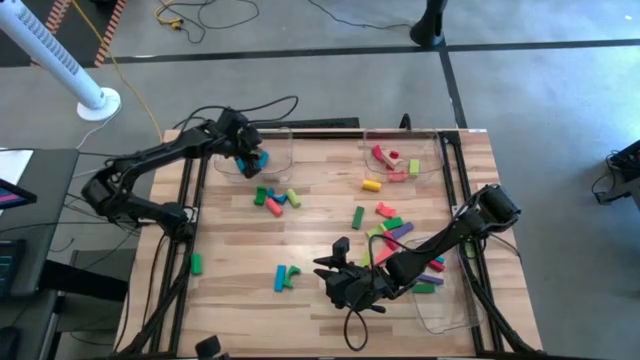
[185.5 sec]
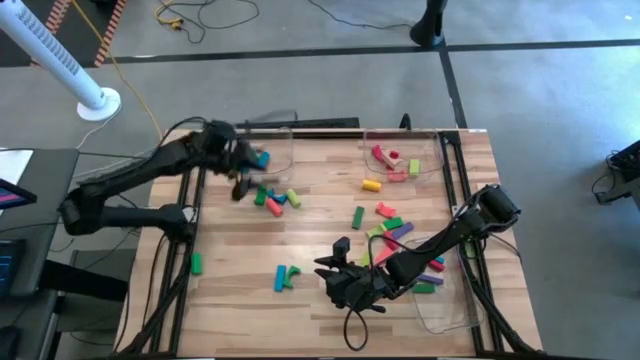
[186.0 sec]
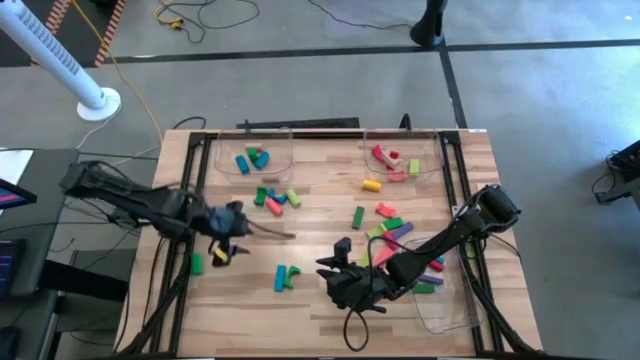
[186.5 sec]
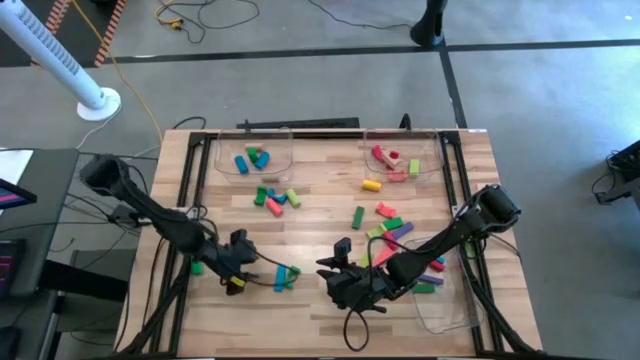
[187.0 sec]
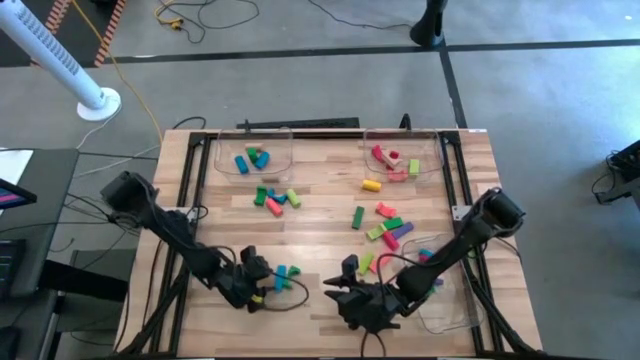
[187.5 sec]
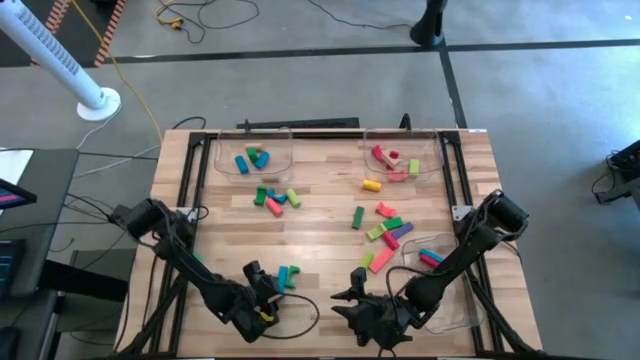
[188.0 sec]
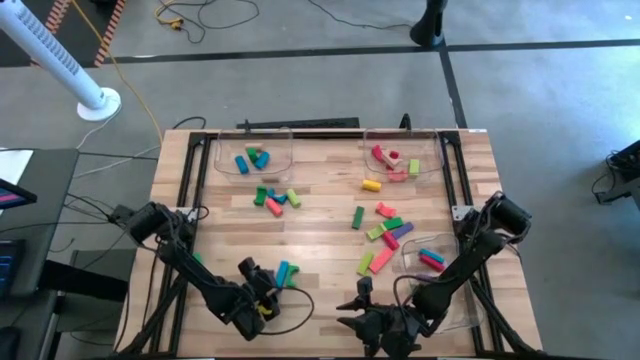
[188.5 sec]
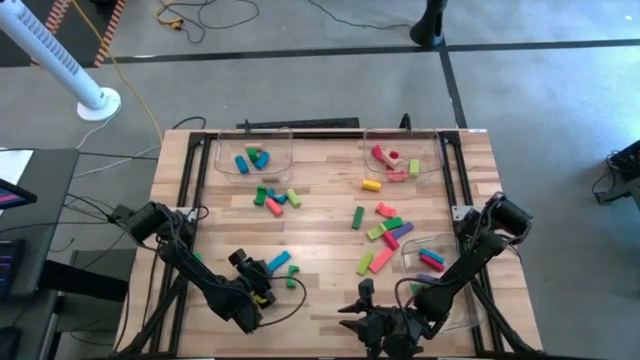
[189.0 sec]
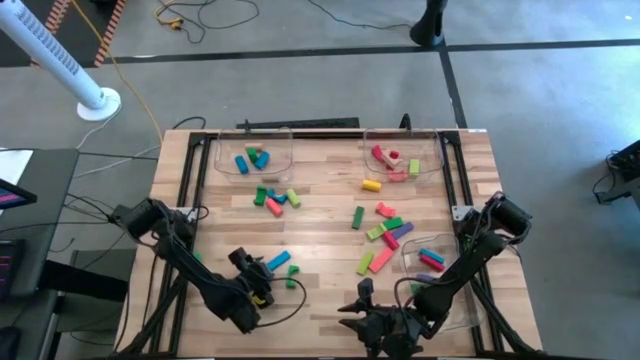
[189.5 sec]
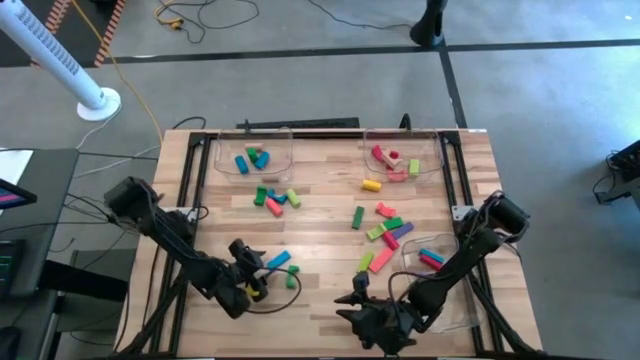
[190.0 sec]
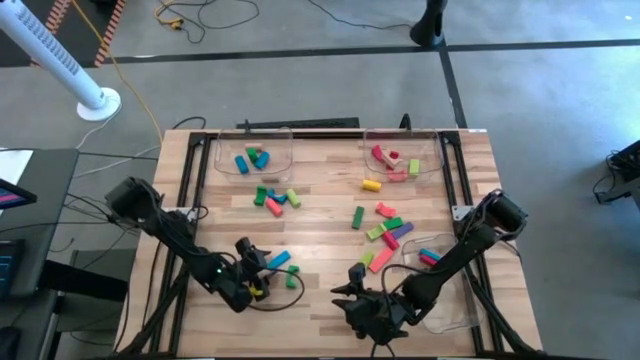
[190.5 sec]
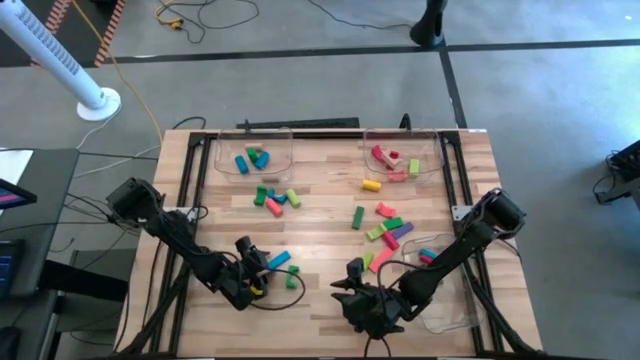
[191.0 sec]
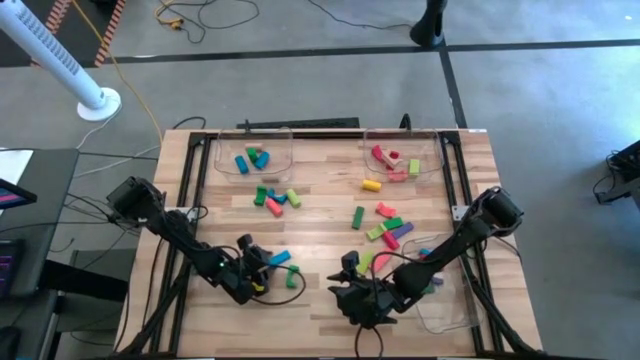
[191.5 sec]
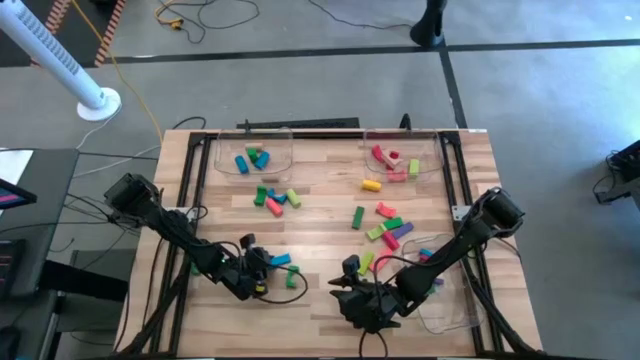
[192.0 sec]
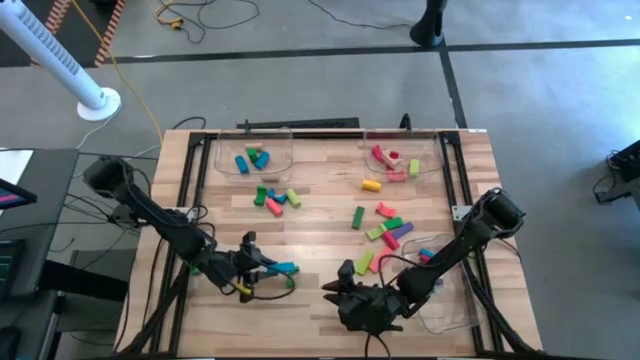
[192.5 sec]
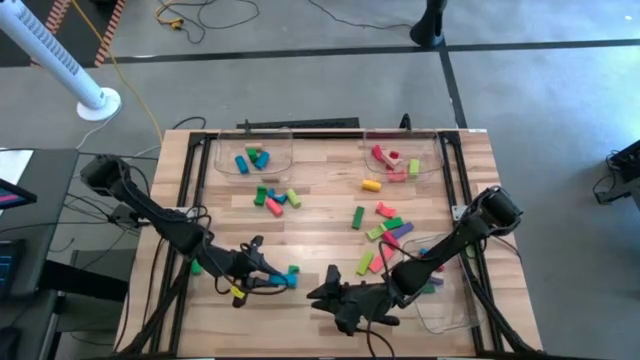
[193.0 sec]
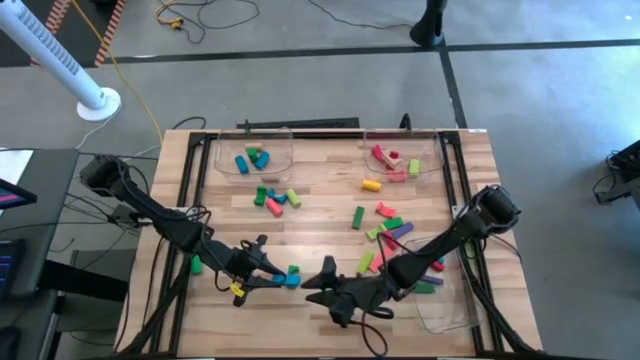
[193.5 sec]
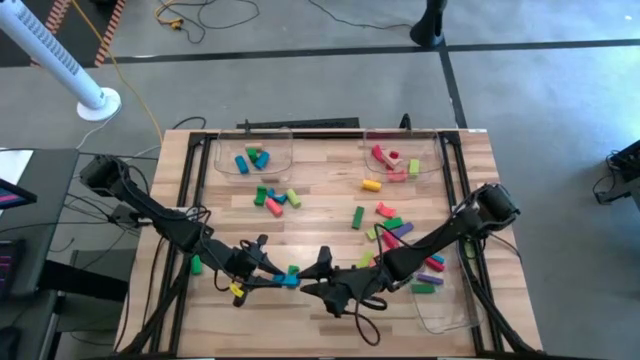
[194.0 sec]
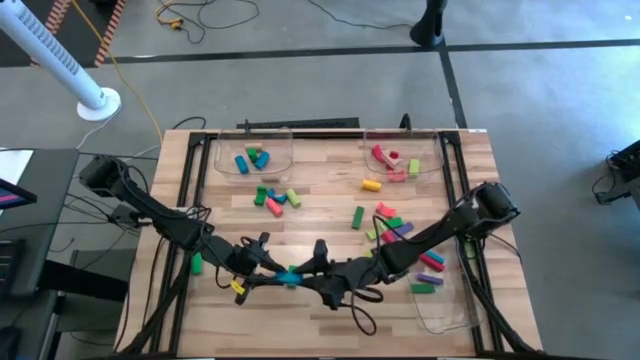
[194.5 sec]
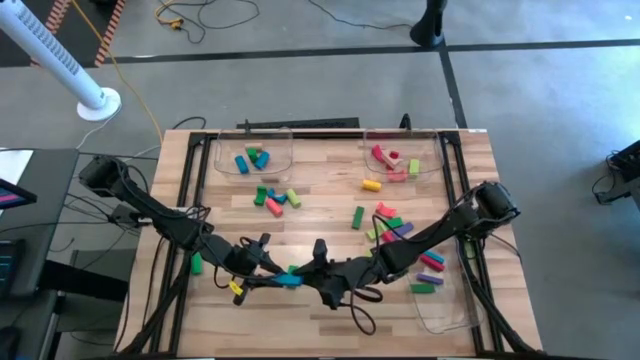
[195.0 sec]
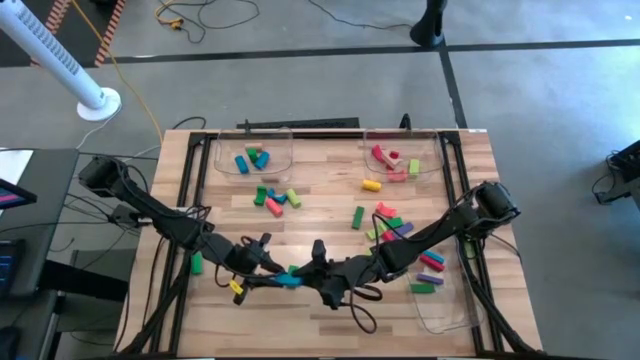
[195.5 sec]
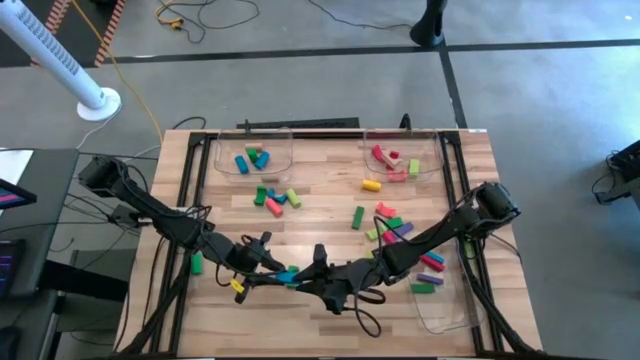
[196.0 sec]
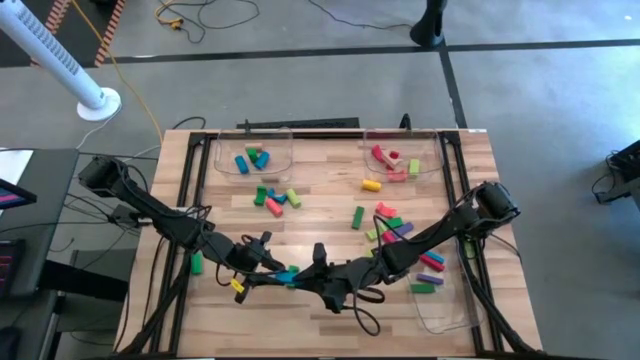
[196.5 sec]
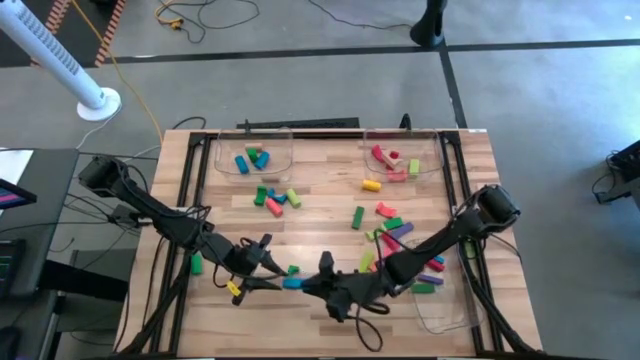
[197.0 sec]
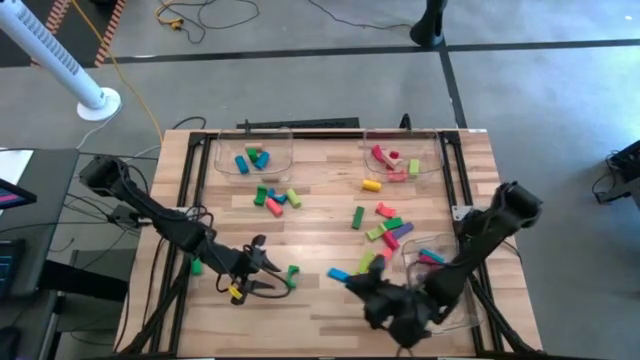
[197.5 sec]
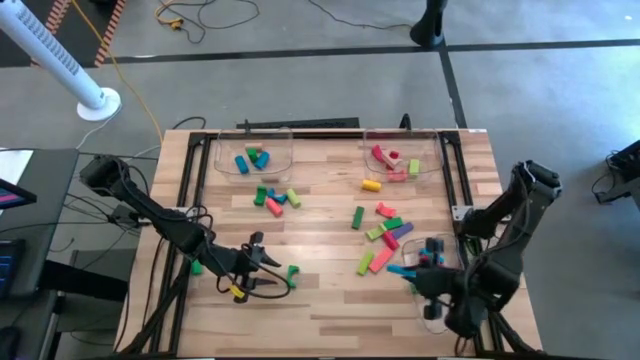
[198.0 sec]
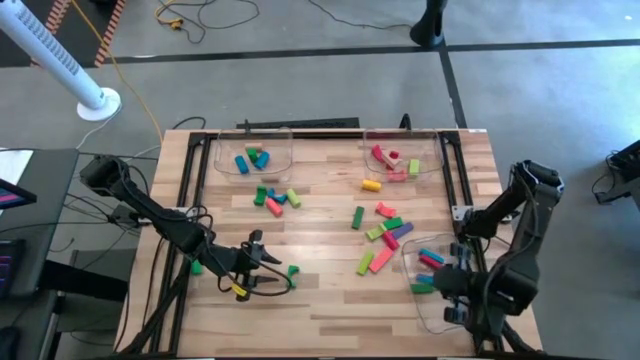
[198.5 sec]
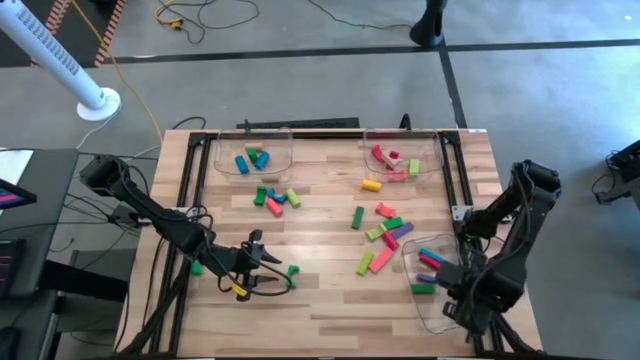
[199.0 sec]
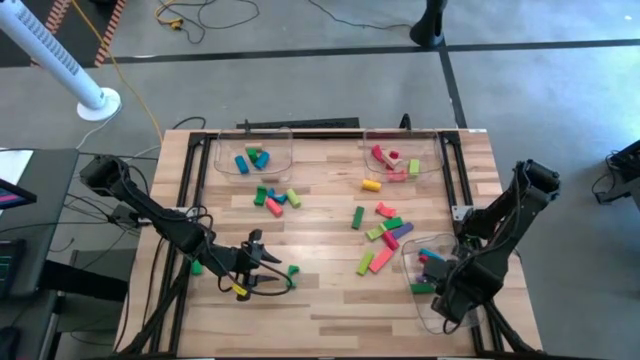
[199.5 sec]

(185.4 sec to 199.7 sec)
Task: Sort blocks by size
Put the blue rectangular block into the bottom transparent bin

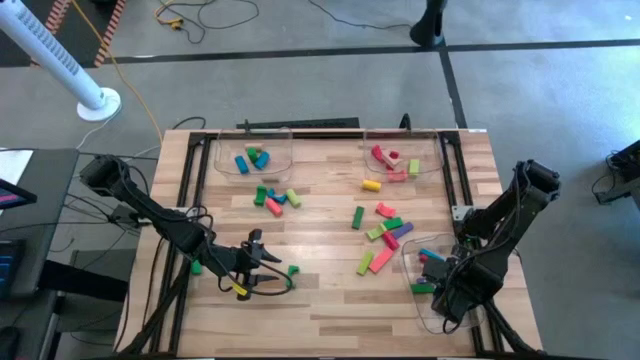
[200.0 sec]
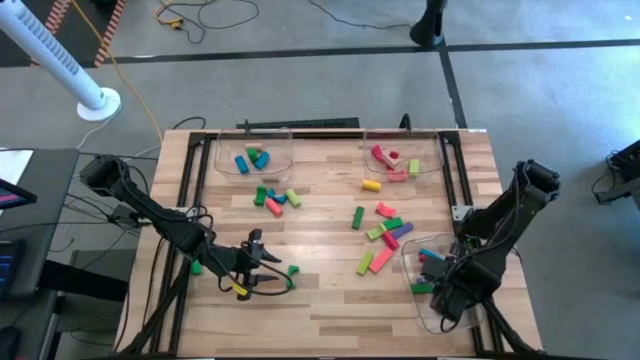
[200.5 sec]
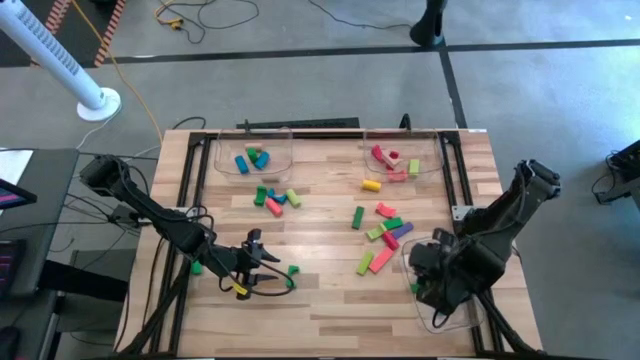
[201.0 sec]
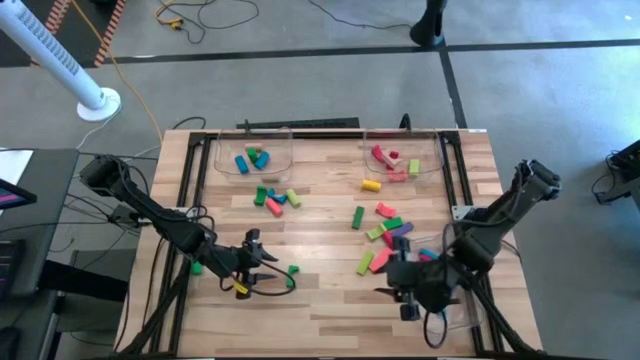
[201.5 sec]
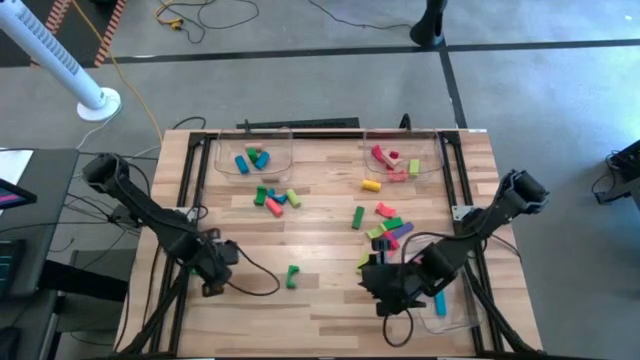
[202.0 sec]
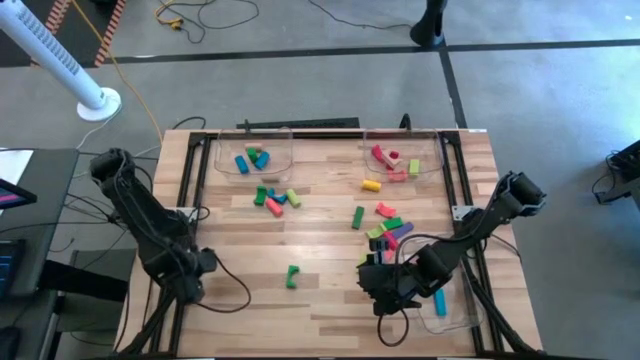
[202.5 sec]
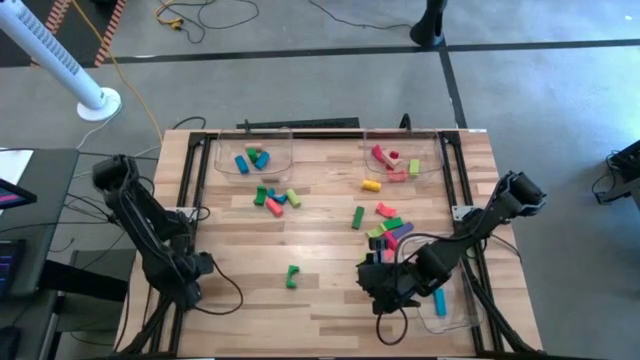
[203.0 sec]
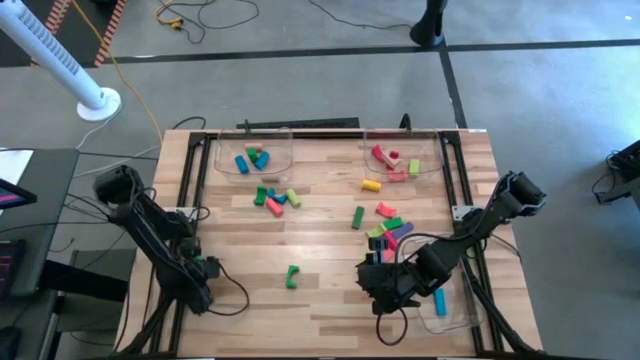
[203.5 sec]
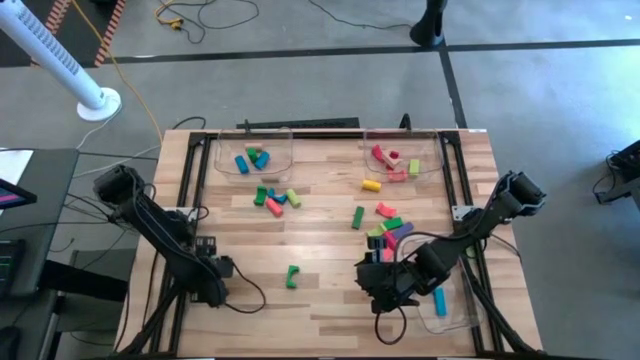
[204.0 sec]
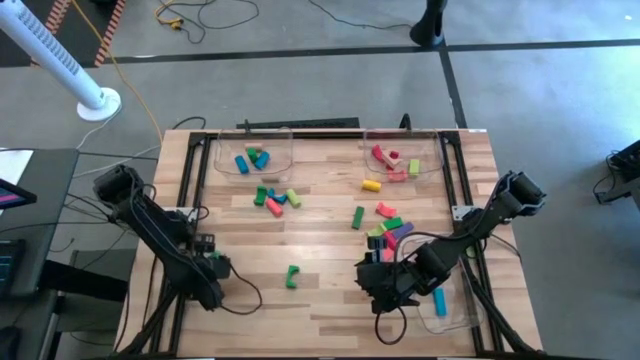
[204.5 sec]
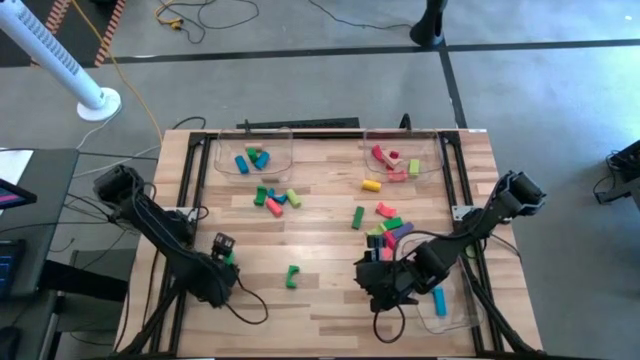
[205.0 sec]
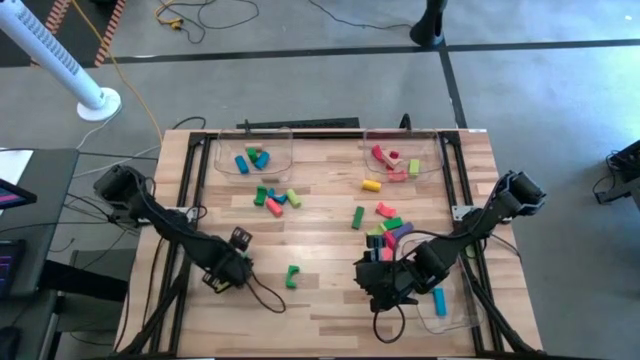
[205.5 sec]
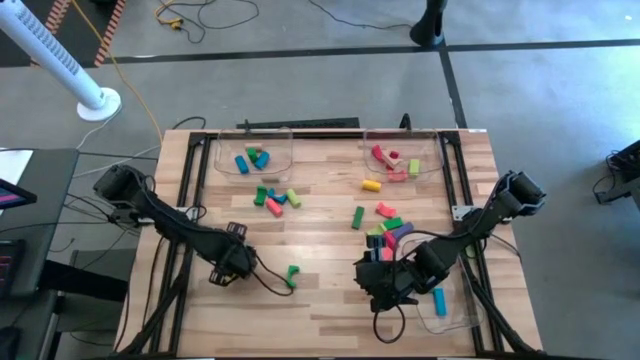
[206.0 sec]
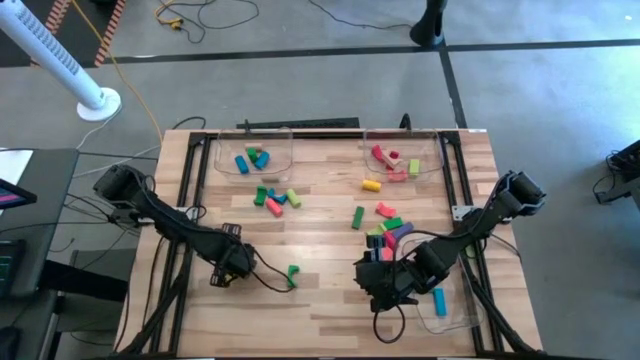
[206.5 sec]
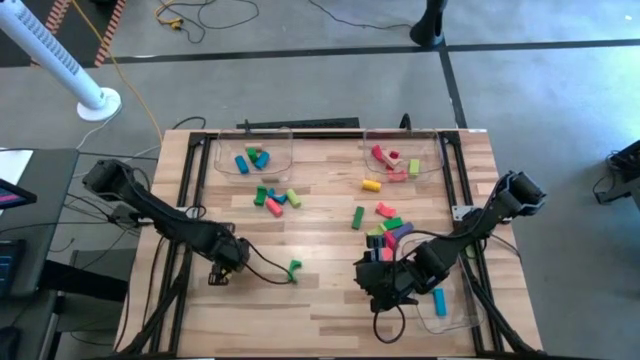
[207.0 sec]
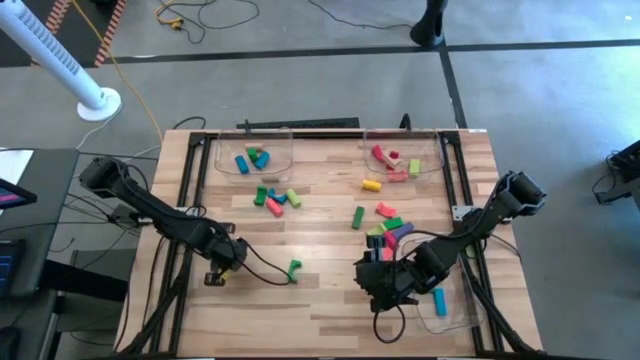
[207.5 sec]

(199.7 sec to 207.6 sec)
Put the green cylindrical block into the top left transparent bin
